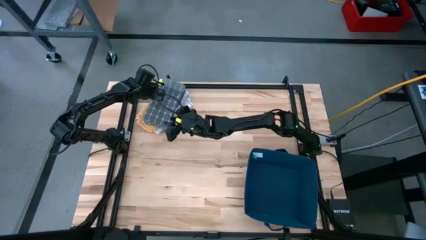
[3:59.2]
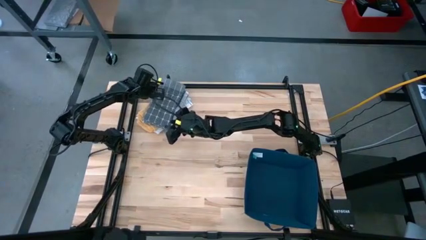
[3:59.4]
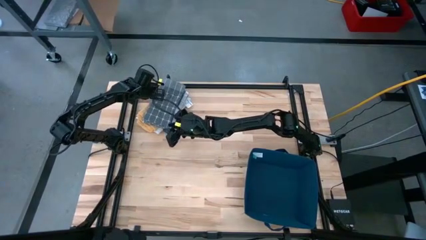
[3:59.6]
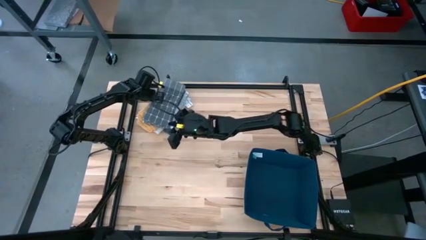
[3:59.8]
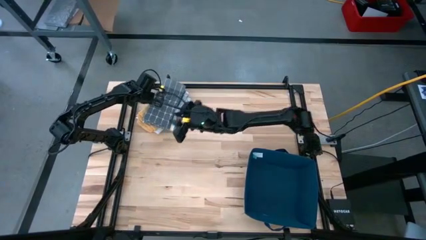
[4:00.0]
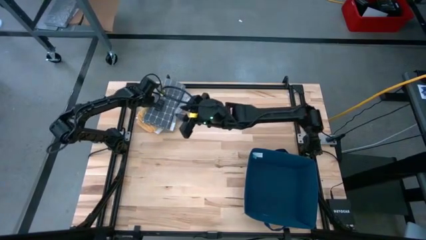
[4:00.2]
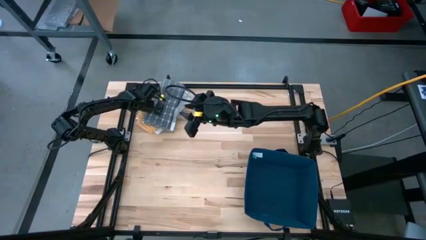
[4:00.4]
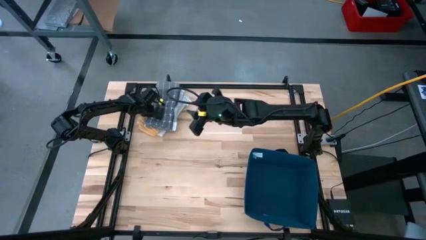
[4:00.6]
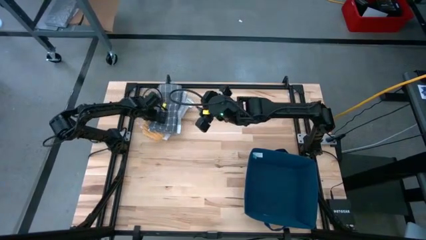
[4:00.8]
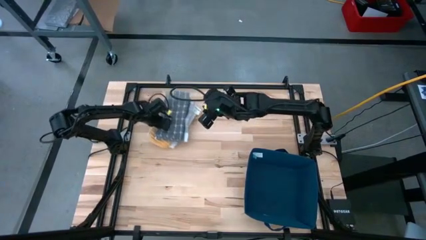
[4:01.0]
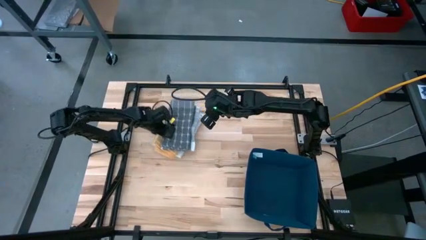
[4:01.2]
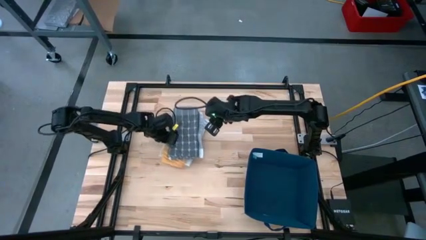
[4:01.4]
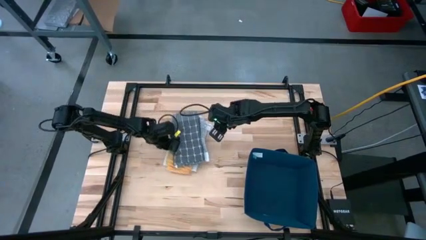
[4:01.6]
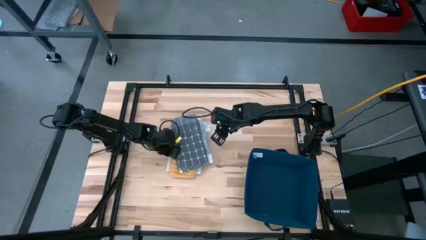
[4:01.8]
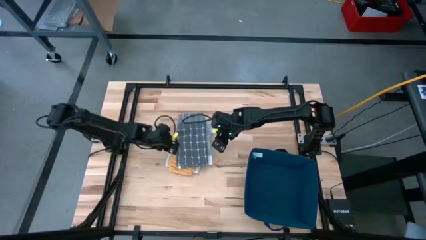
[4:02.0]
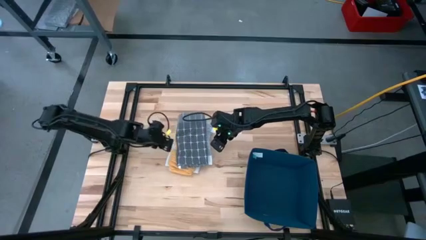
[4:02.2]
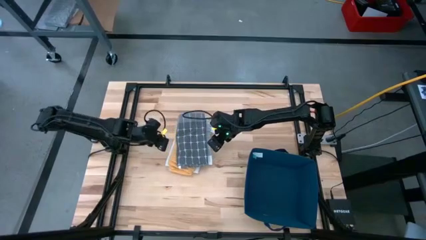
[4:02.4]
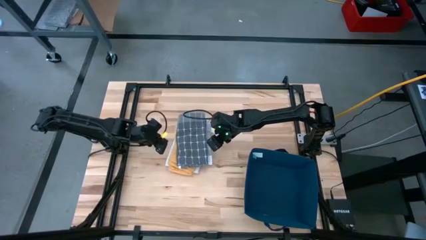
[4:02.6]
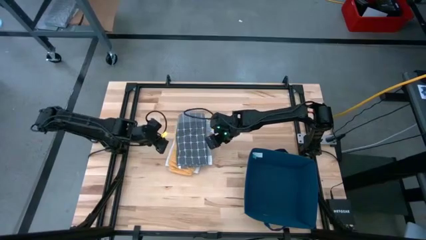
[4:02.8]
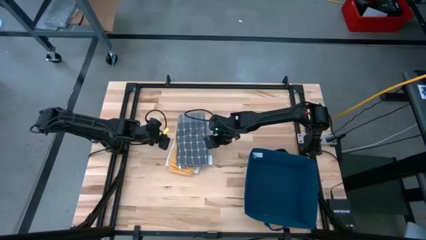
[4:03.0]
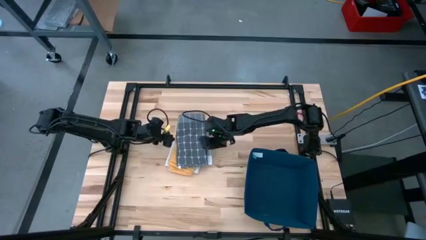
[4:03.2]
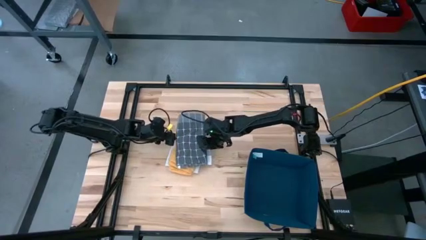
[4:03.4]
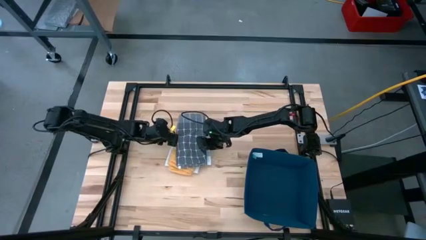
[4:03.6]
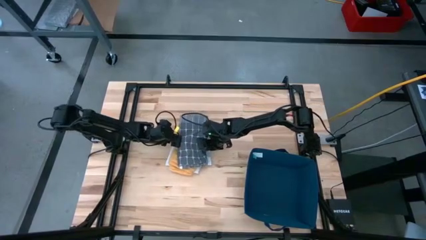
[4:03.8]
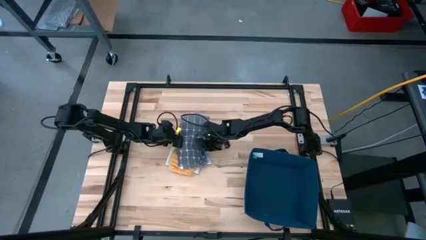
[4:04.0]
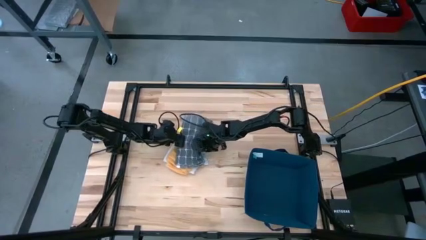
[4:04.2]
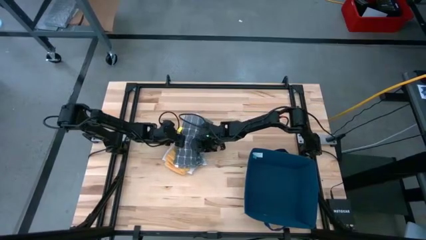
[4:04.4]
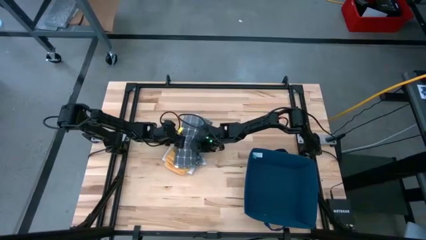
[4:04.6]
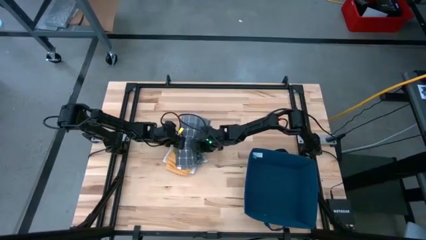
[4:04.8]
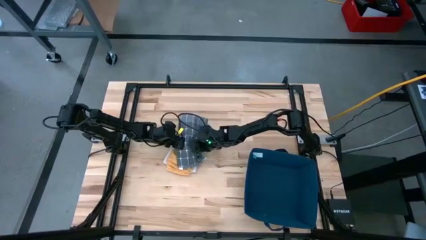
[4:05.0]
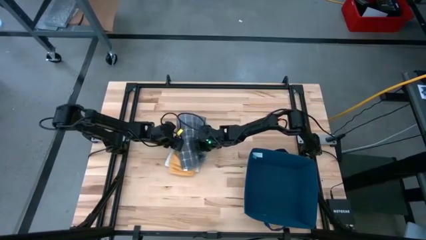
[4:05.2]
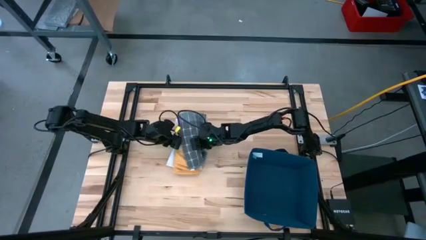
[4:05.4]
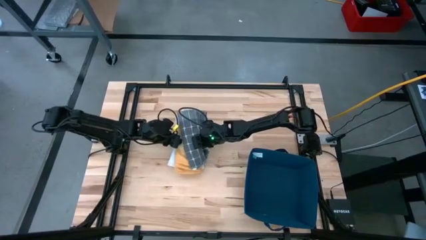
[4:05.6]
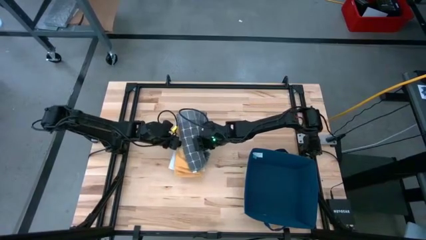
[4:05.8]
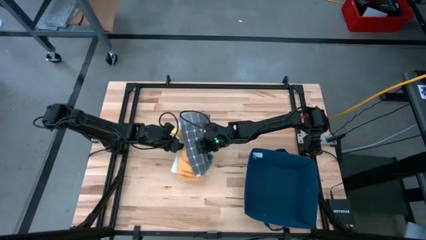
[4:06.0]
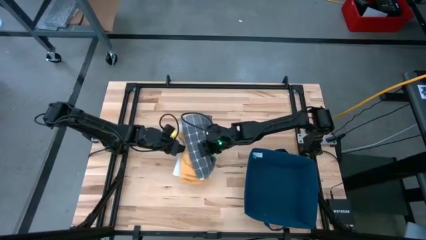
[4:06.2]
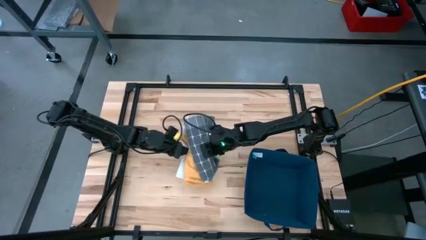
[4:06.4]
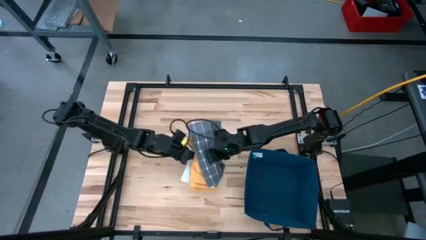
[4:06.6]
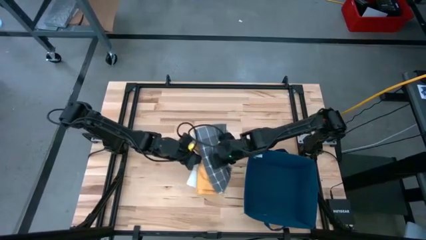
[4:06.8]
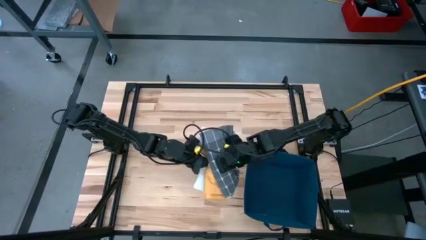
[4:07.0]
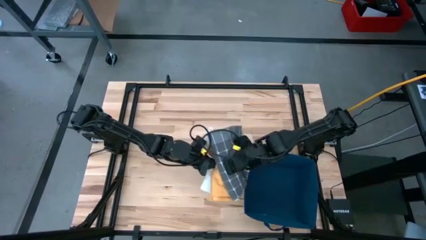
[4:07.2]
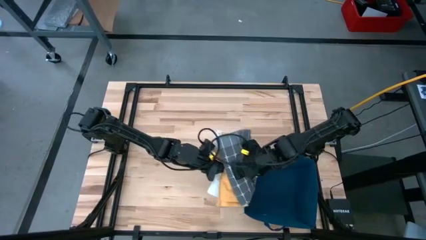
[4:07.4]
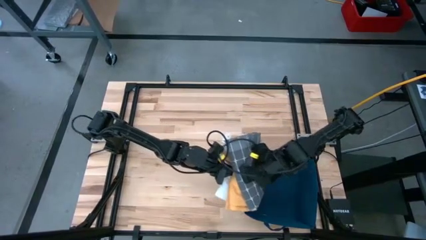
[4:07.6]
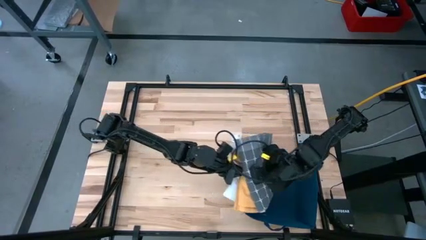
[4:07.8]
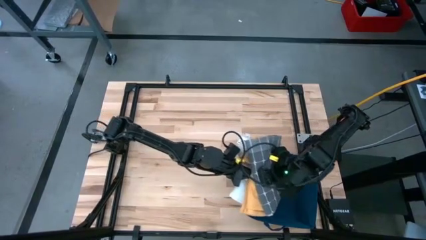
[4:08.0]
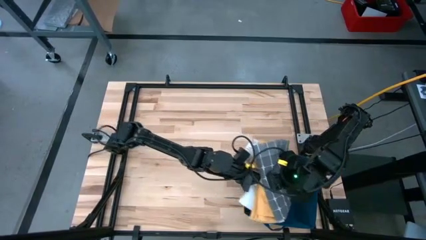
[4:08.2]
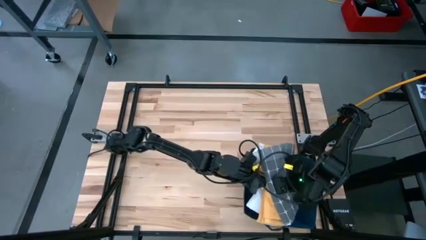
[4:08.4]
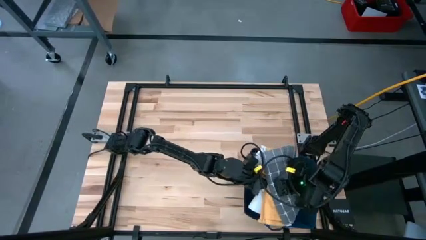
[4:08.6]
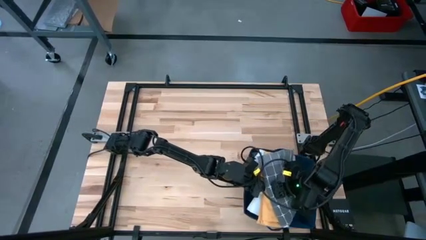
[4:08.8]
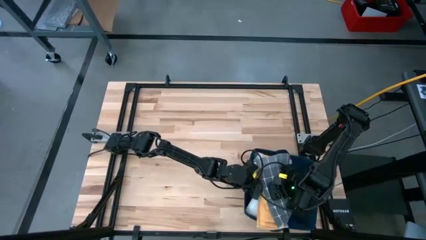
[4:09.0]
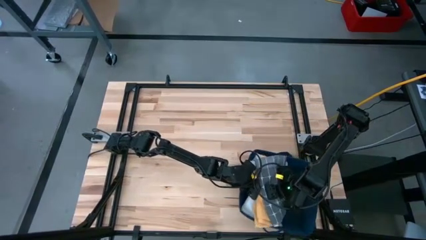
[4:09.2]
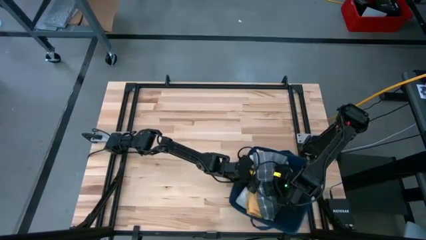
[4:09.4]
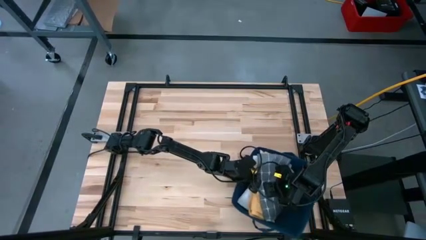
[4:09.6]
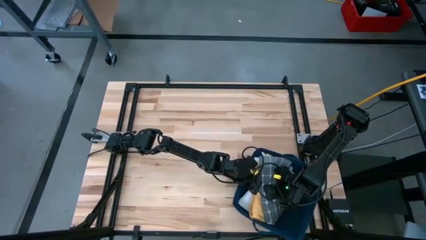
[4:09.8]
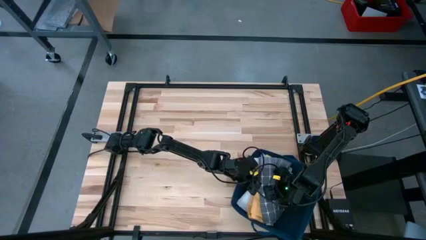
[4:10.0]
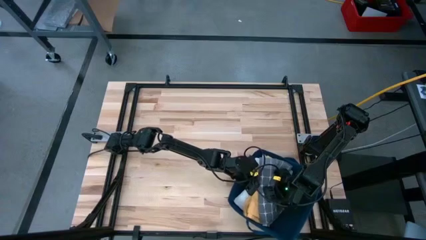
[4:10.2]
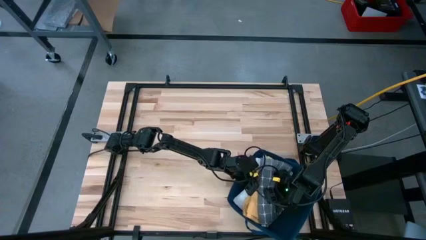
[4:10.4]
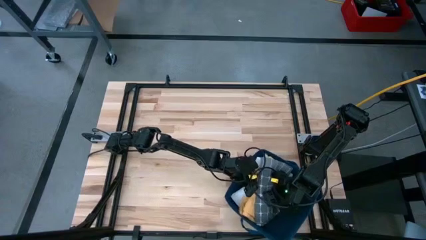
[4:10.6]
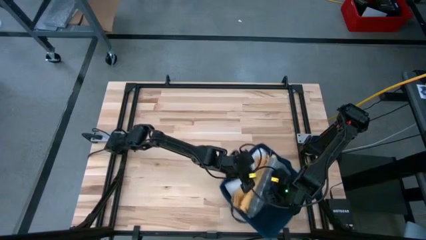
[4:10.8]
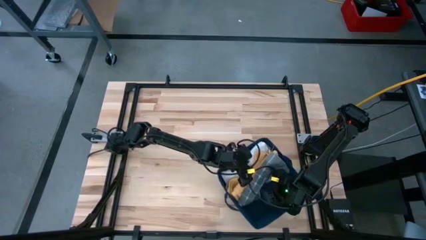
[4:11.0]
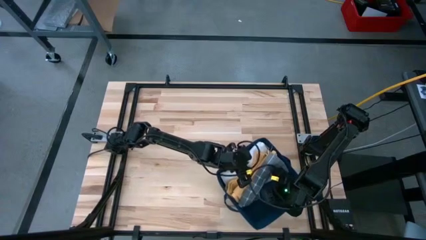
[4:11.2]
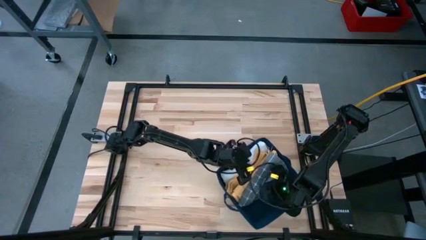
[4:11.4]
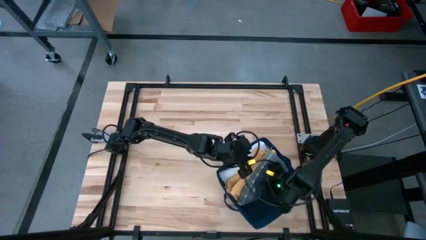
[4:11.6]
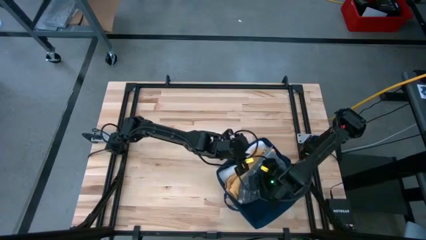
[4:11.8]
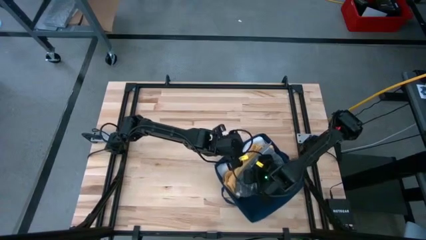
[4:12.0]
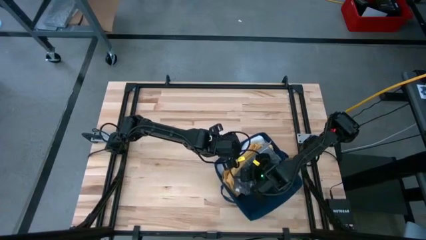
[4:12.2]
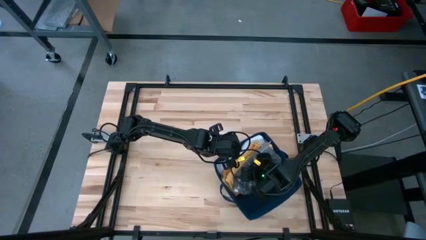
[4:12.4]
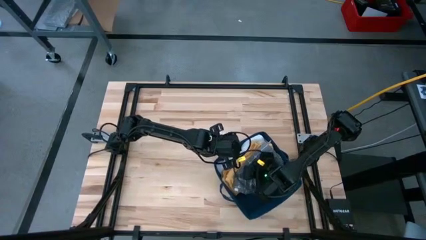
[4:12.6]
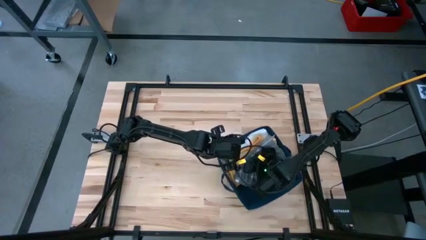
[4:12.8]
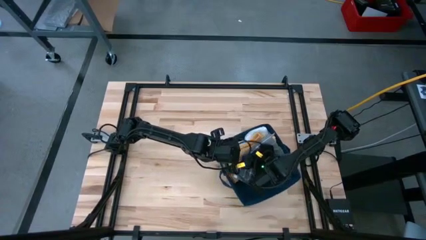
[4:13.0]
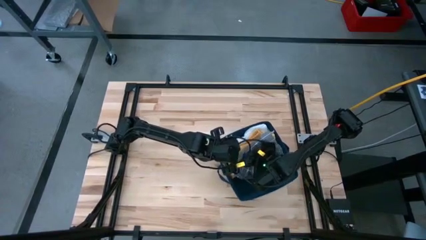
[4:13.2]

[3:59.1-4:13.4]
Task: Fold towel
Put the stacked towels into the blue laundry organizer

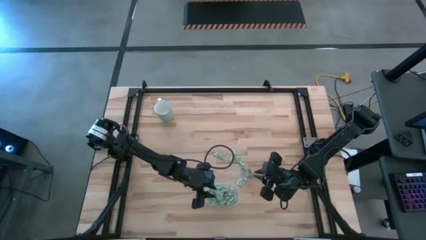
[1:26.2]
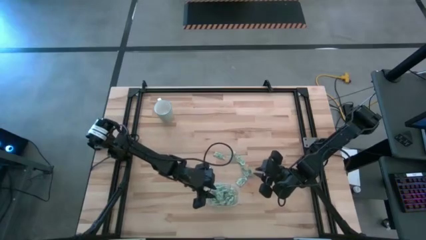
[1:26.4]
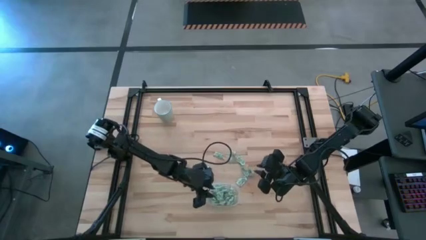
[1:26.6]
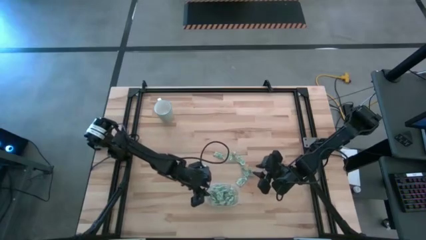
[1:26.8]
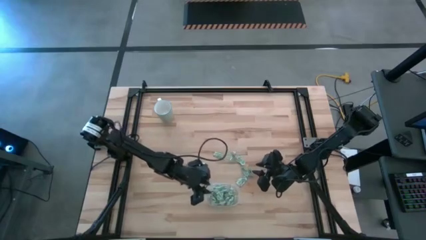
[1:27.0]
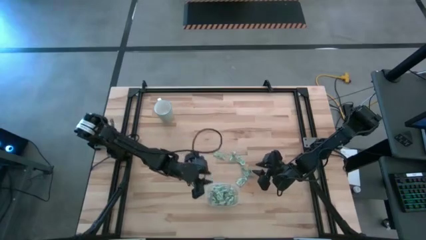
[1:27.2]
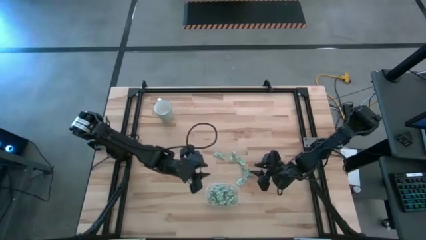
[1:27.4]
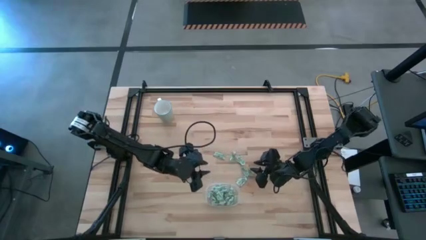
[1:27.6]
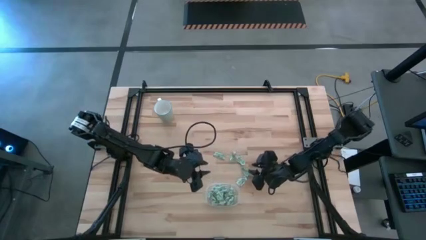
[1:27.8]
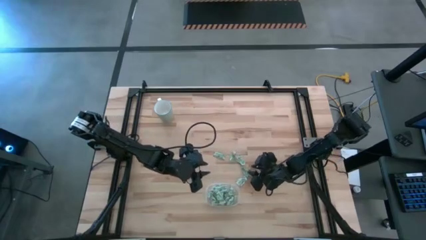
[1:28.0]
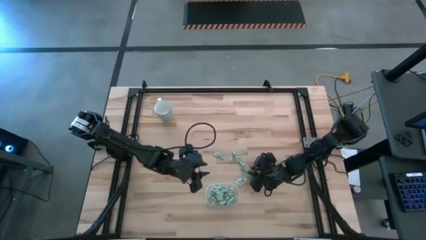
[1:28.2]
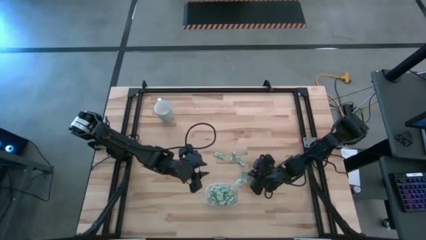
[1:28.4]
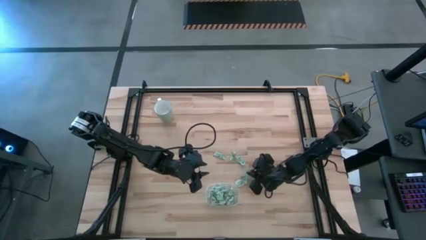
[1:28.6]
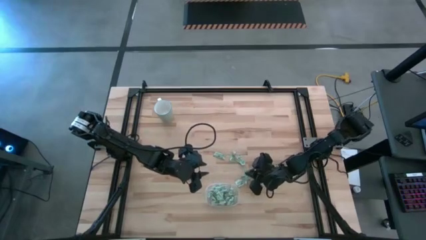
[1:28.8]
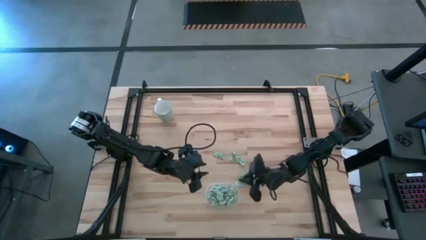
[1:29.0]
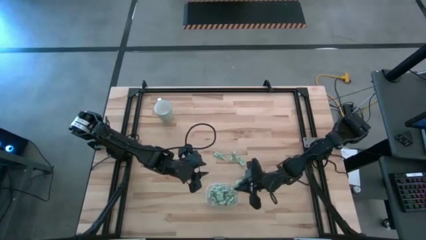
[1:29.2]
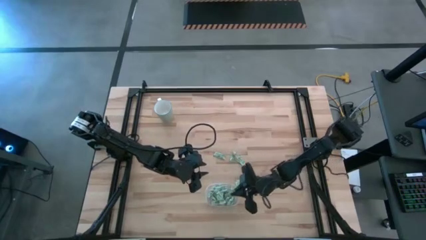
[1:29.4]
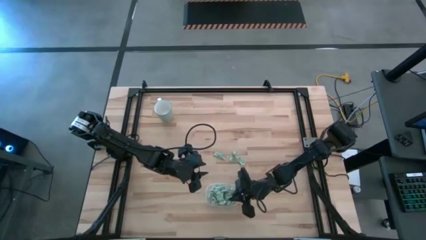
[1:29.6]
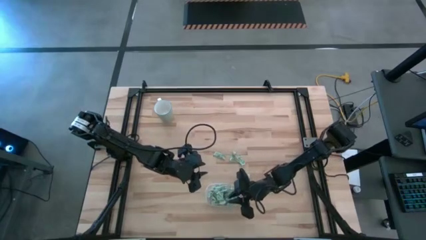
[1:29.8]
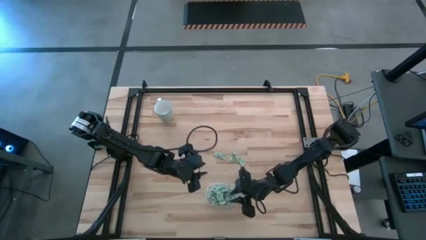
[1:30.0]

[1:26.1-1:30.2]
Task: Pick and place Stevia / Truvia into bins
Put the stevia packet into the transparent container
